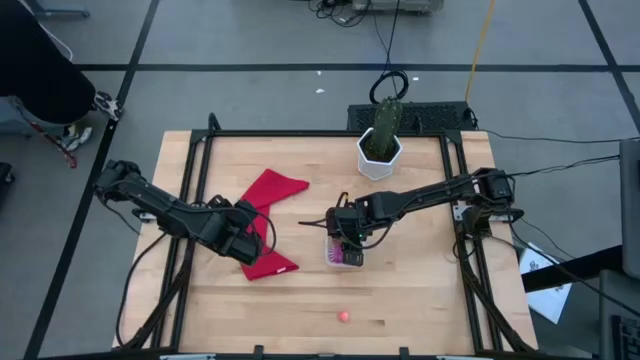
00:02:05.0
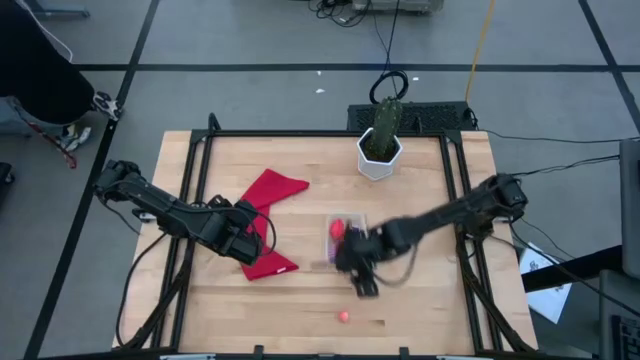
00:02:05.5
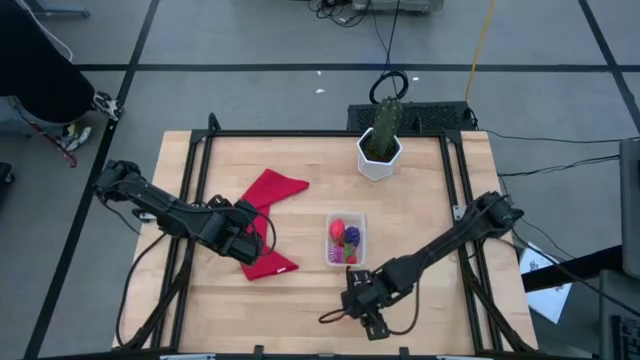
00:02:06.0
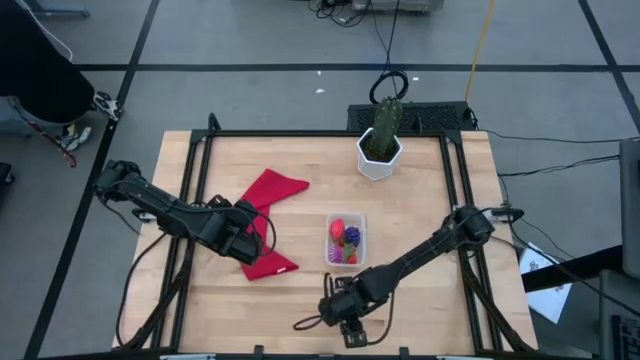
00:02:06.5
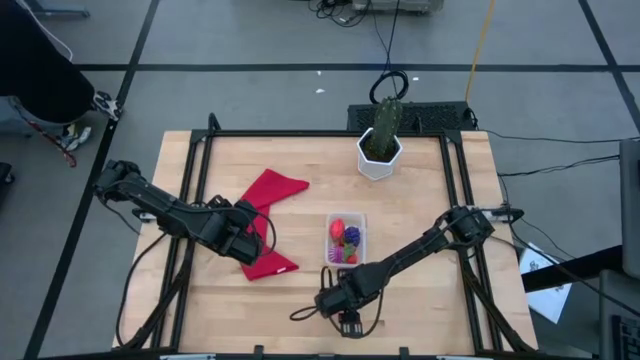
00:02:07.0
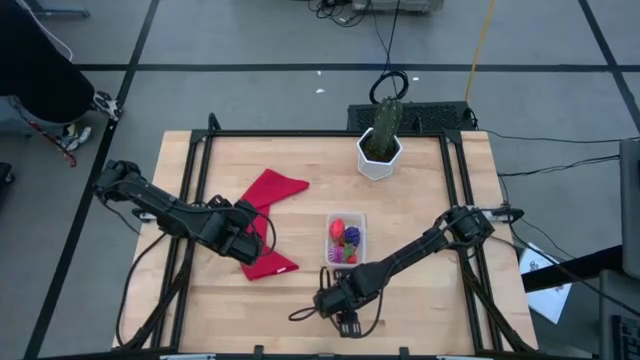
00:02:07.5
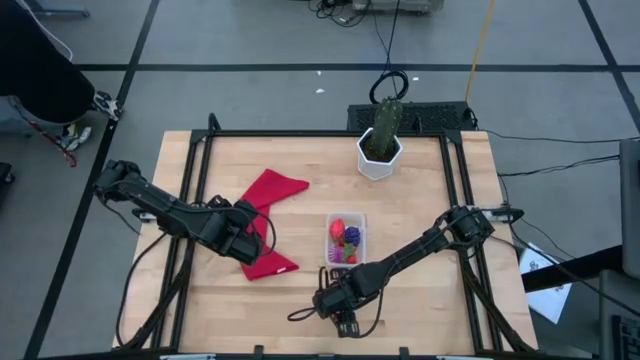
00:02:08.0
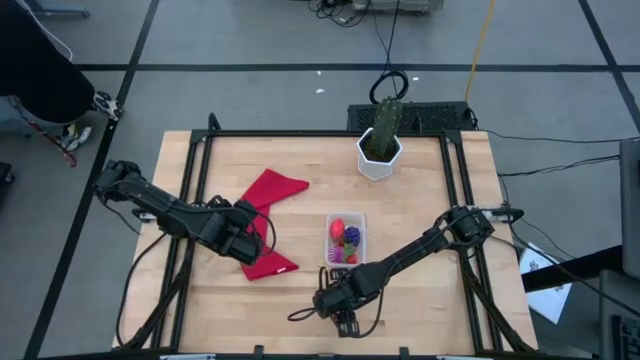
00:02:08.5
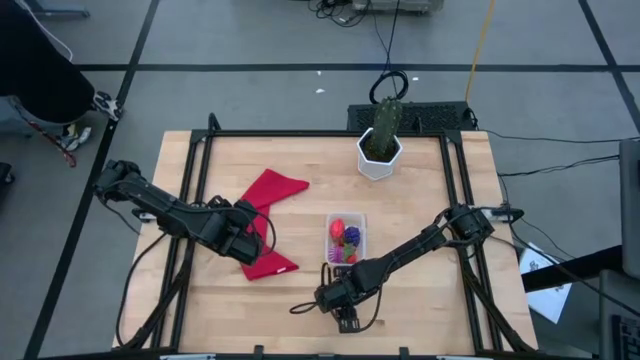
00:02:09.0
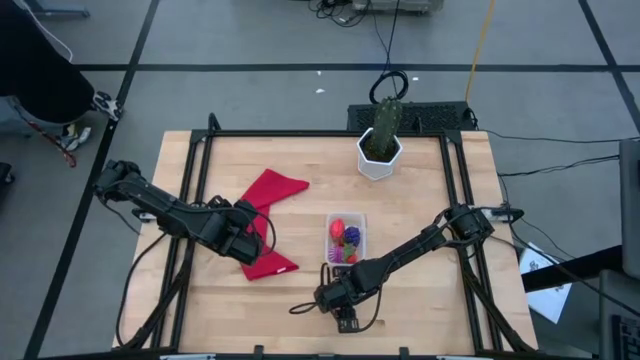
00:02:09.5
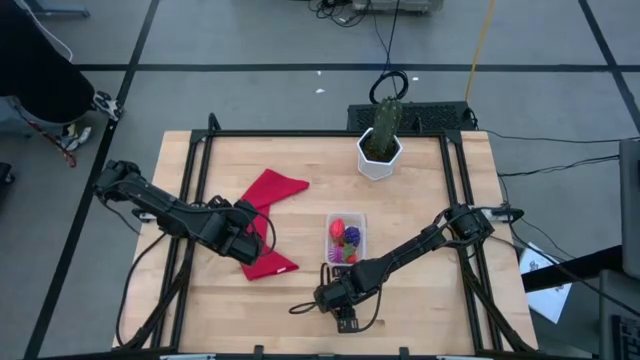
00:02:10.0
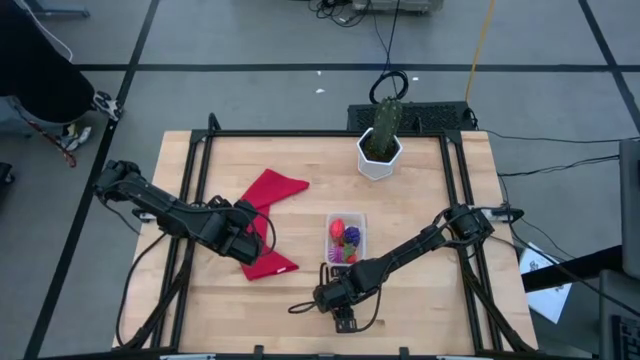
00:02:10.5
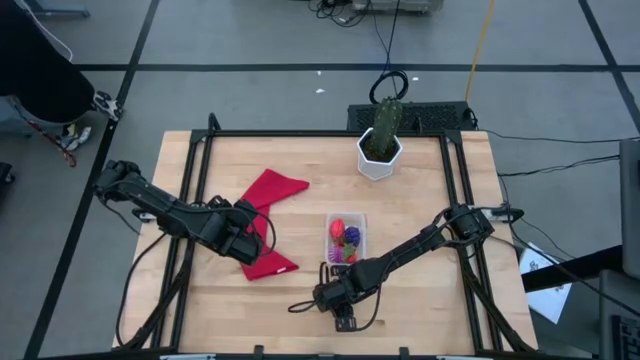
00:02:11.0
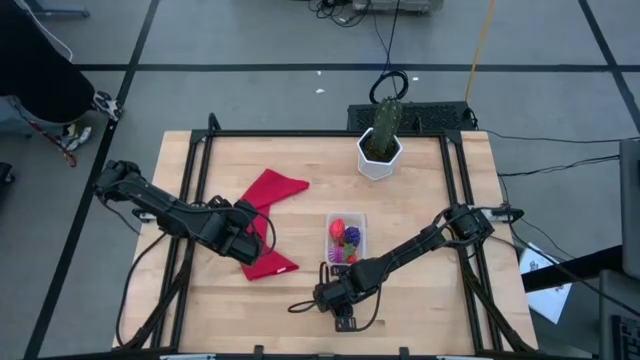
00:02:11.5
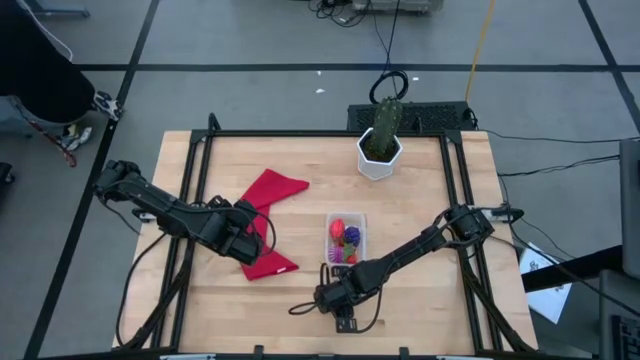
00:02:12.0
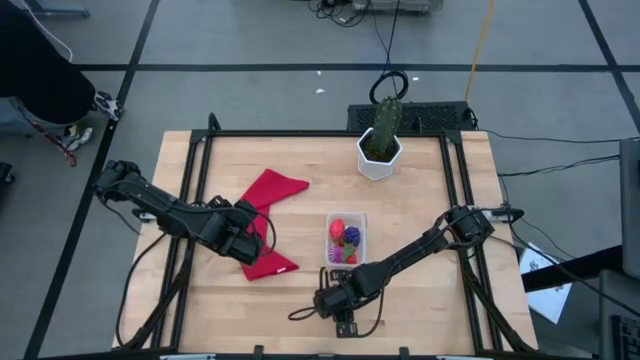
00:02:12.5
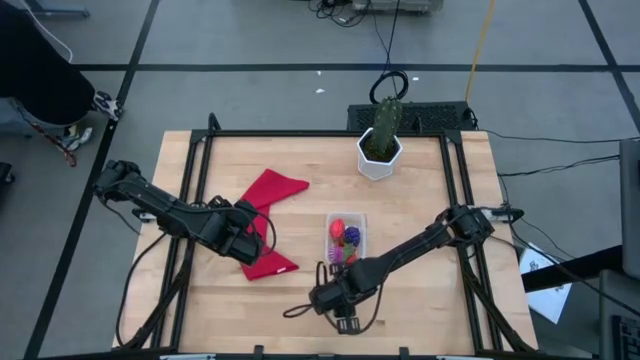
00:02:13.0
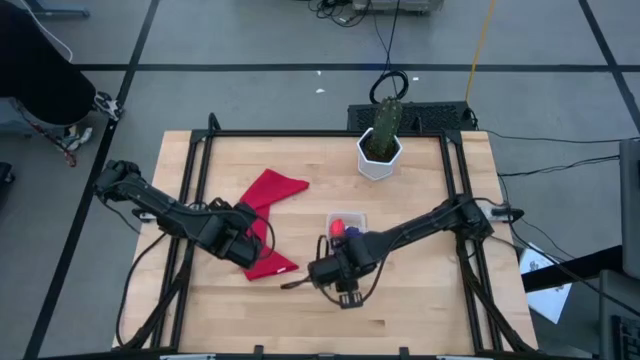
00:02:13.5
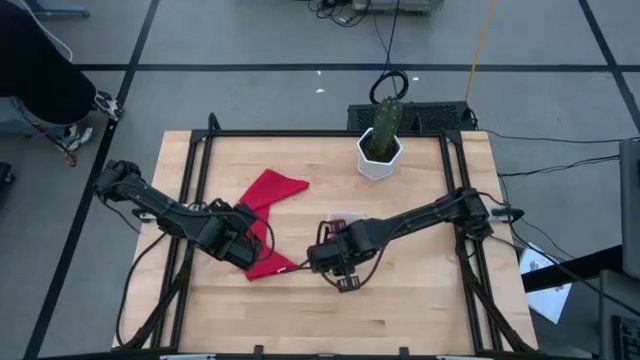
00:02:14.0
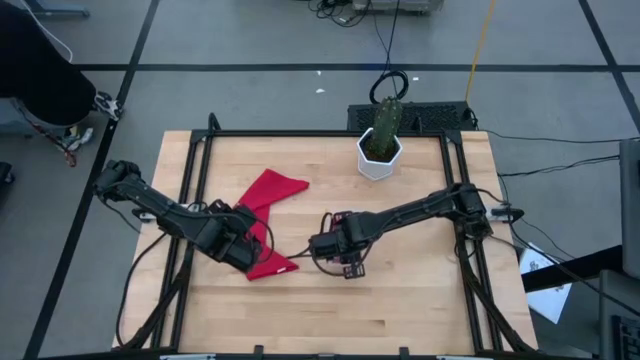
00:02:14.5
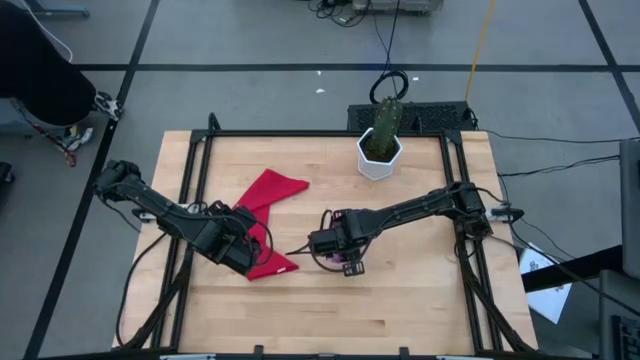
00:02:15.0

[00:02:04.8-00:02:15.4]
Task: Pick and placing Produce into tupperware
Put the pink peach into the transparent bin

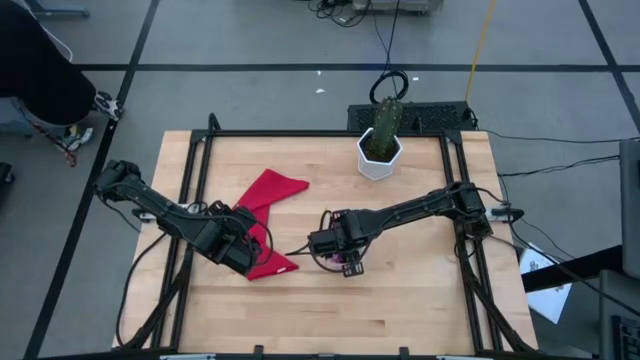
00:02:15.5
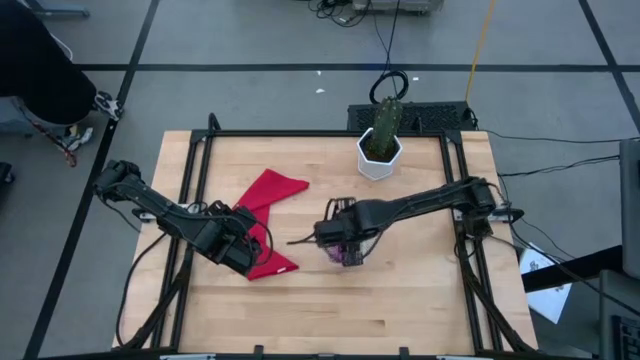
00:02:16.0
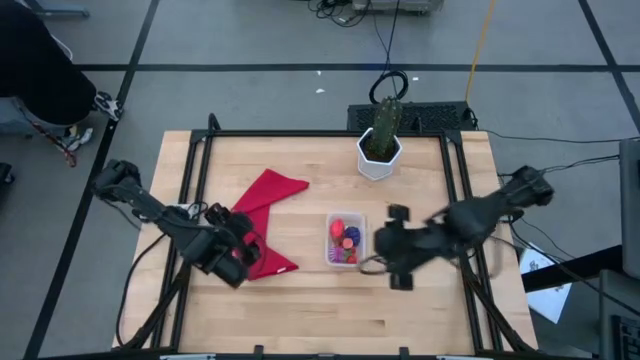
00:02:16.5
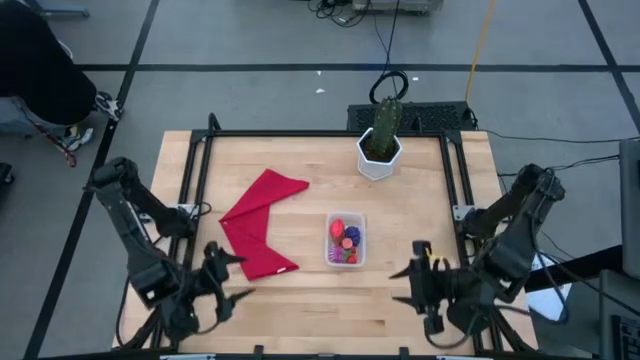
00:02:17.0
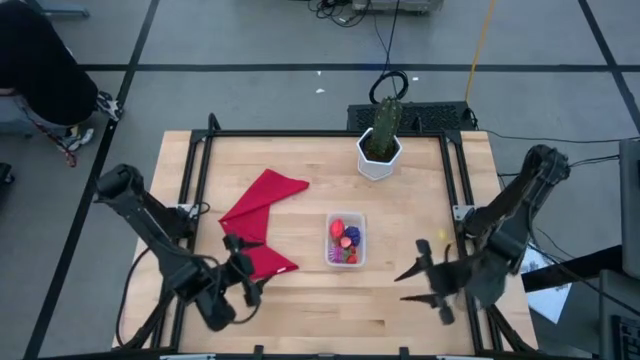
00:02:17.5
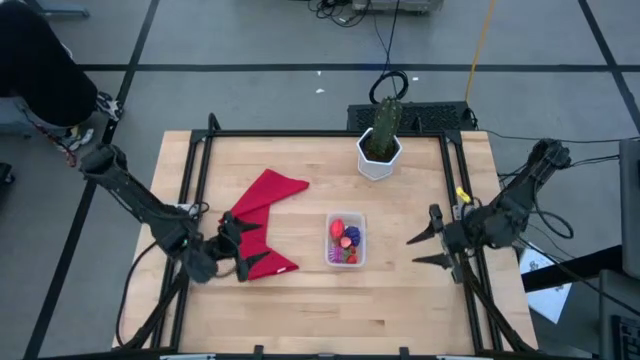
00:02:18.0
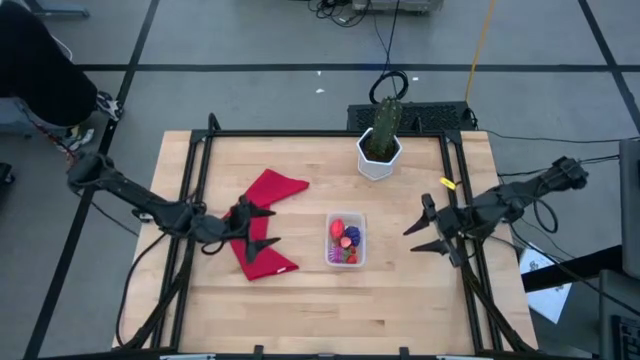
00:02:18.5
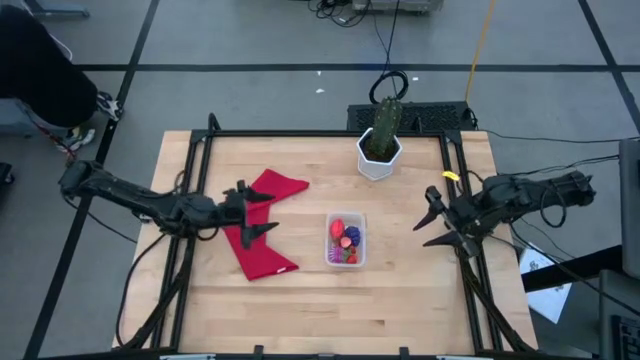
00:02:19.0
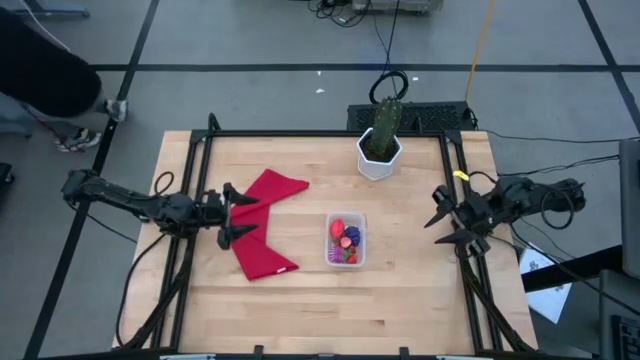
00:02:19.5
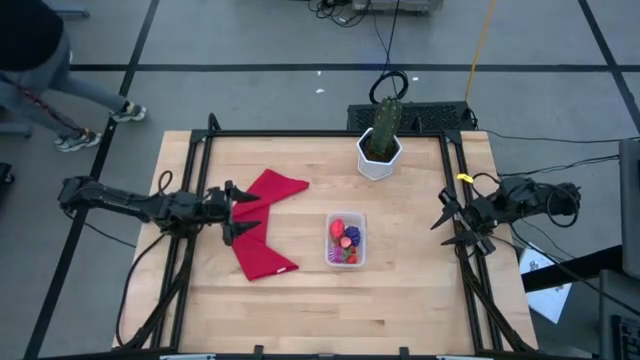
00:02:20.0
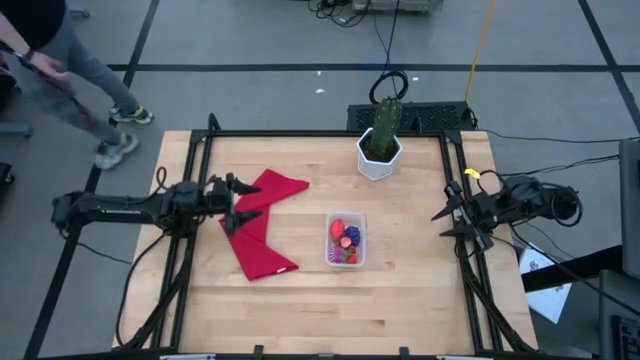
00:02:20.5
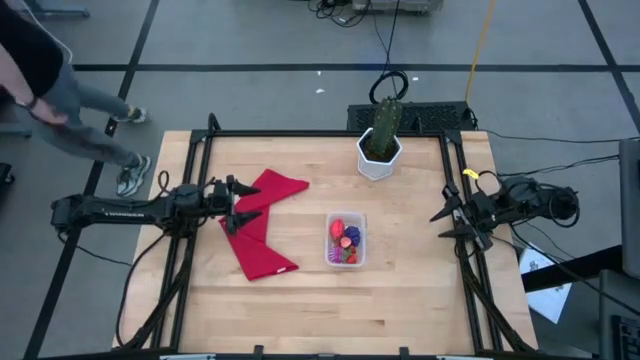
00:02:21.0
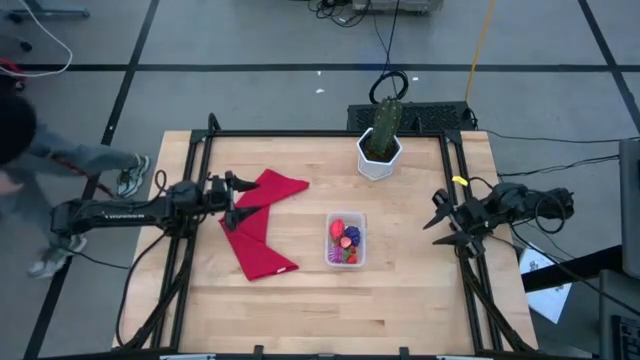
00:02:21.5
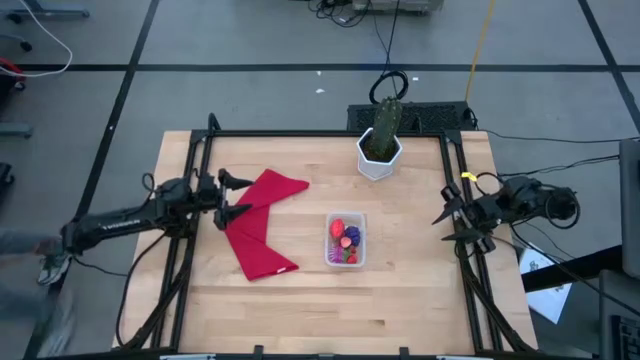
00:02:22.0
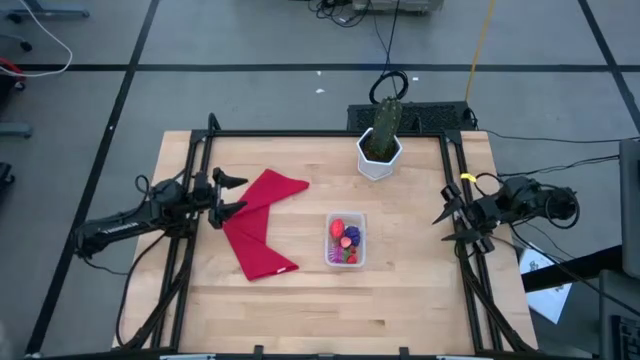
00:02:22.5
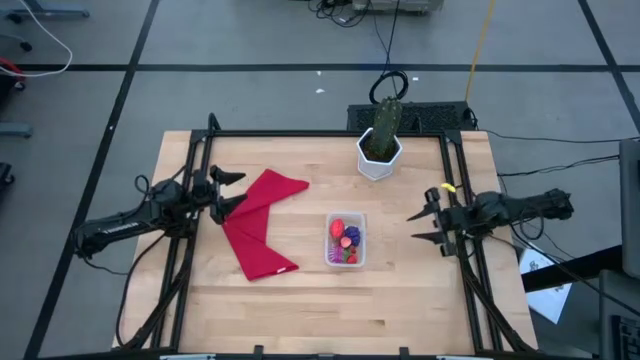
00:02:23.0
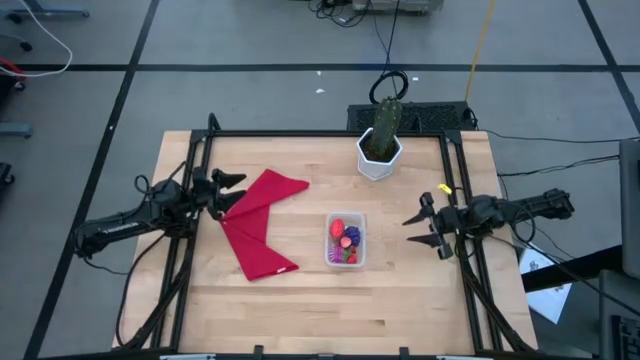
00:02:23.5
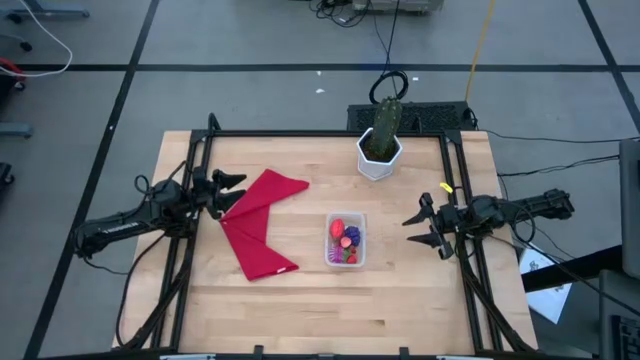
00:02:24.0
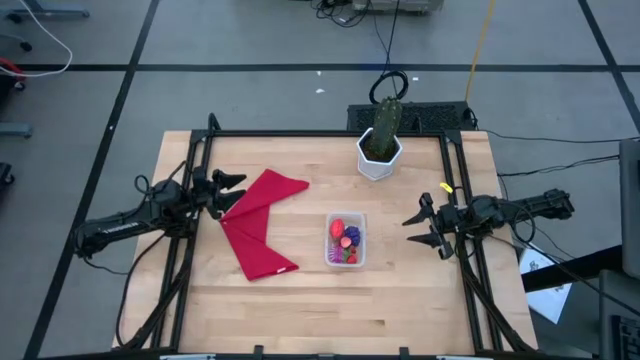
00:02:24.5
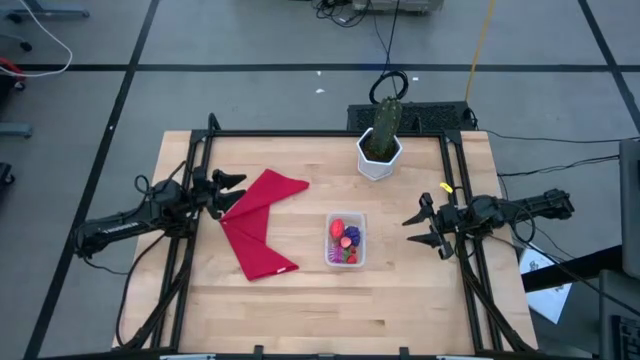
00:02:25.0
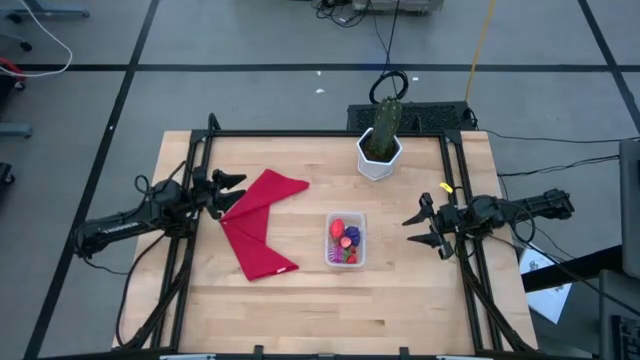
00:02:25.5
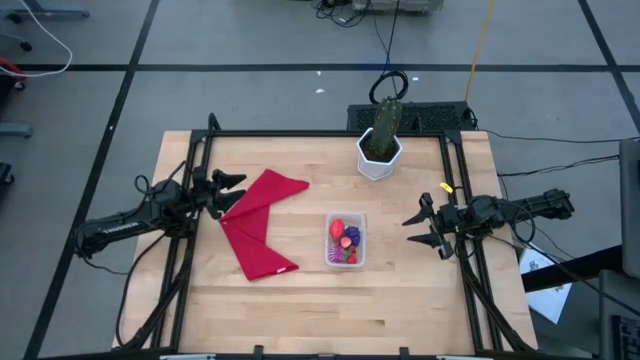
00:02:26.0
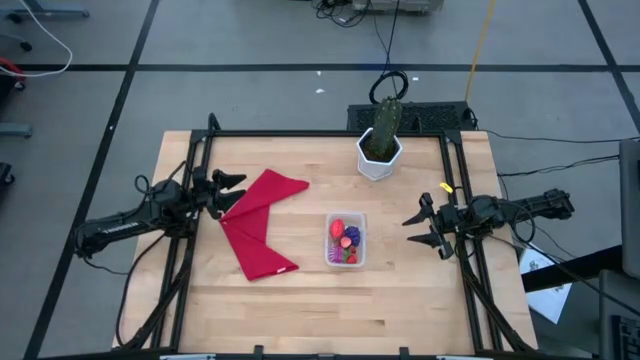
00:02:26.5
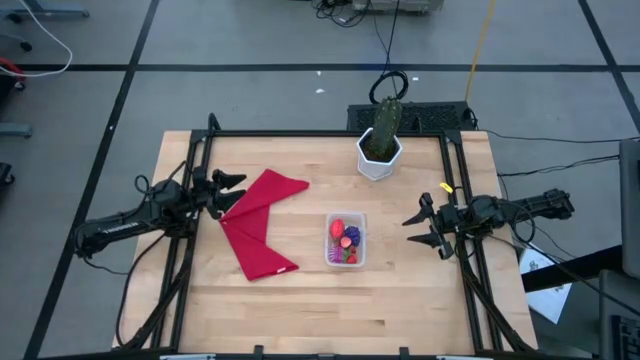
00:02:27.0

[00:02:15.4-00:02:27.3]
Return to Home Position
